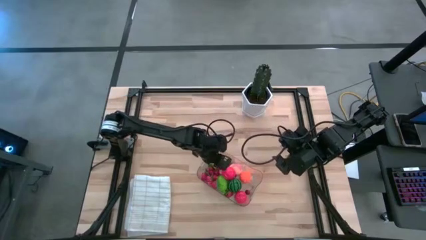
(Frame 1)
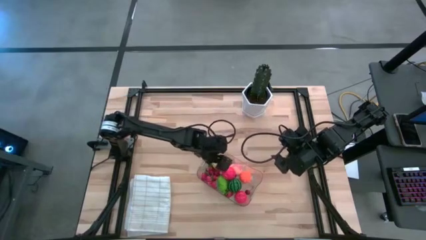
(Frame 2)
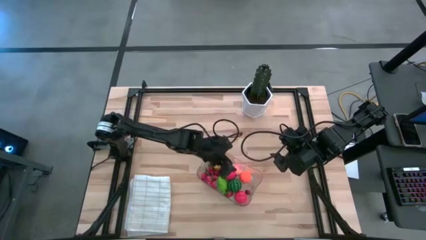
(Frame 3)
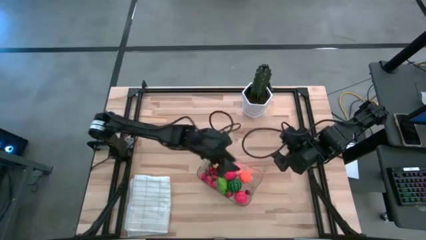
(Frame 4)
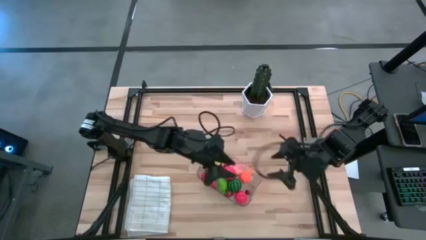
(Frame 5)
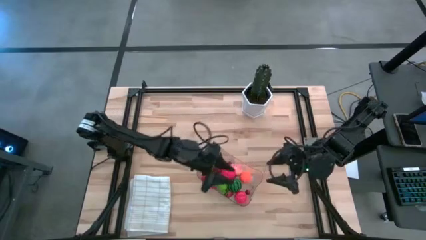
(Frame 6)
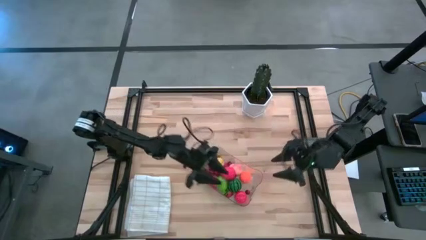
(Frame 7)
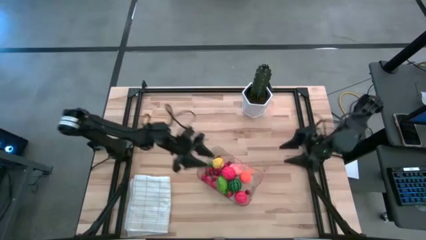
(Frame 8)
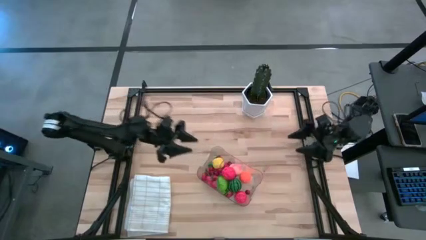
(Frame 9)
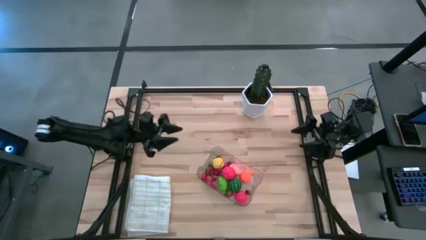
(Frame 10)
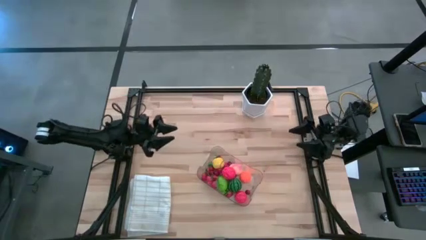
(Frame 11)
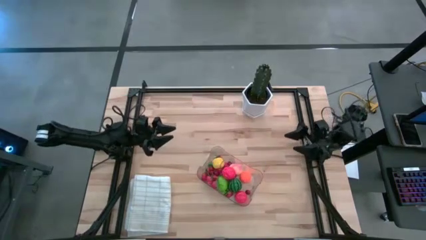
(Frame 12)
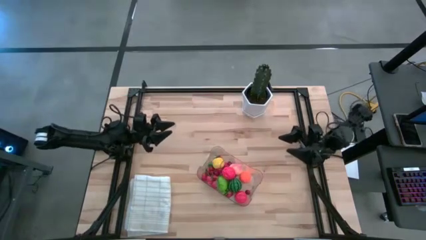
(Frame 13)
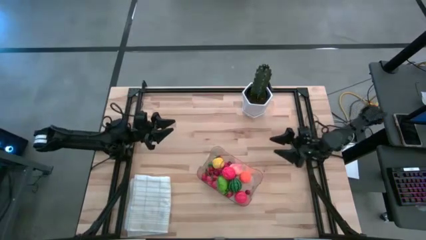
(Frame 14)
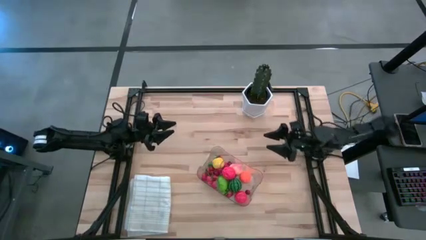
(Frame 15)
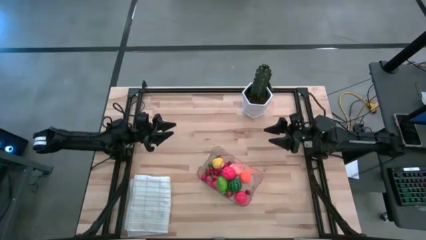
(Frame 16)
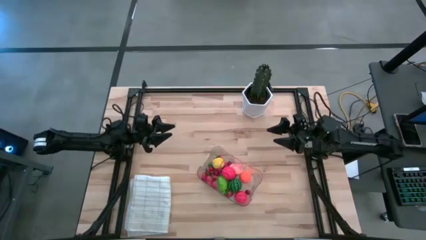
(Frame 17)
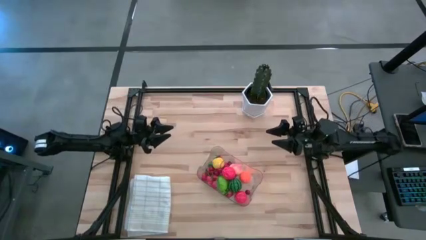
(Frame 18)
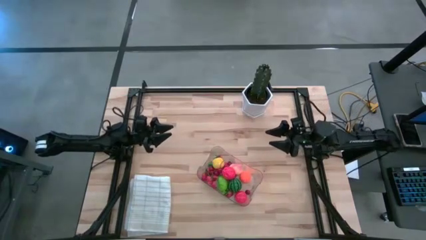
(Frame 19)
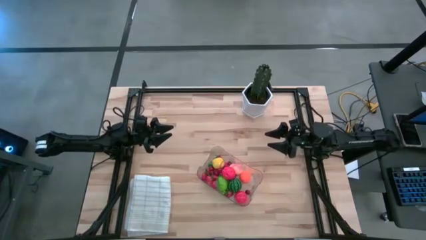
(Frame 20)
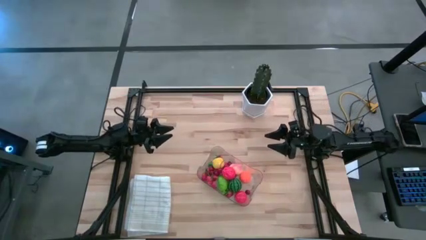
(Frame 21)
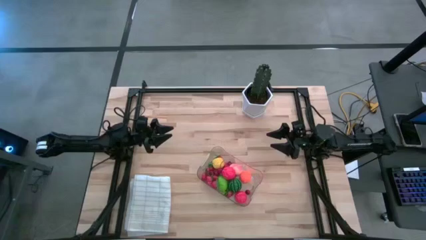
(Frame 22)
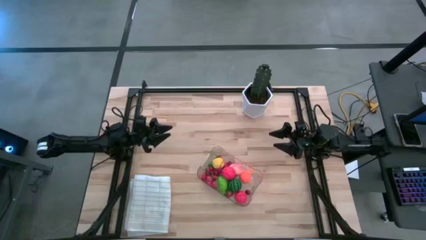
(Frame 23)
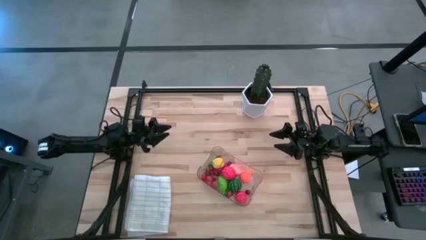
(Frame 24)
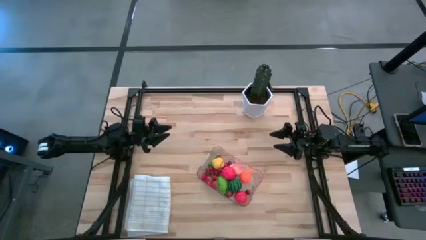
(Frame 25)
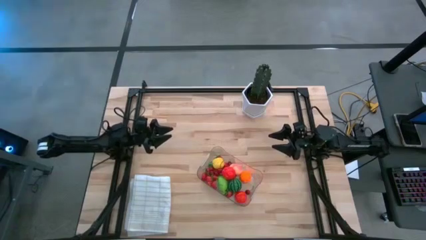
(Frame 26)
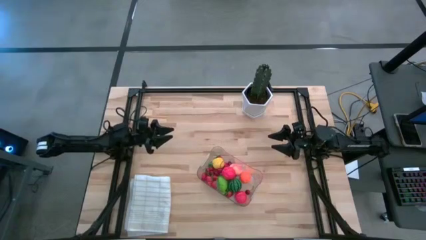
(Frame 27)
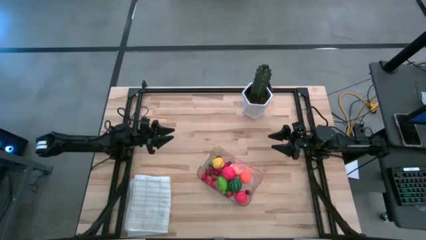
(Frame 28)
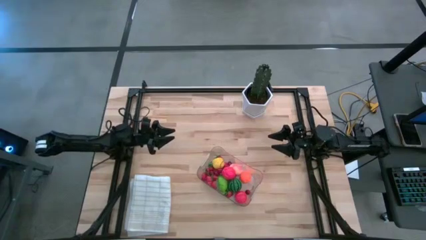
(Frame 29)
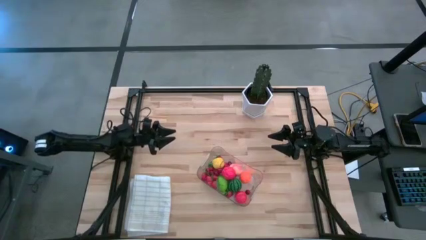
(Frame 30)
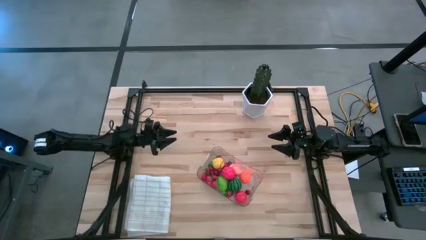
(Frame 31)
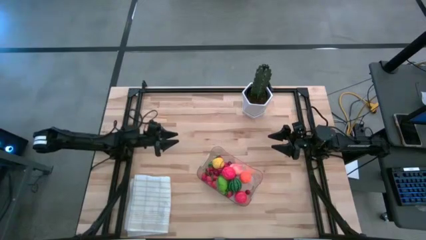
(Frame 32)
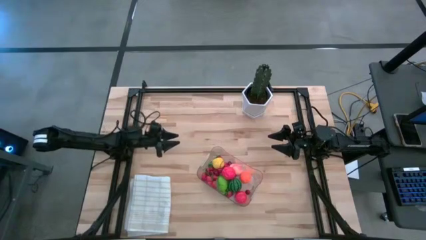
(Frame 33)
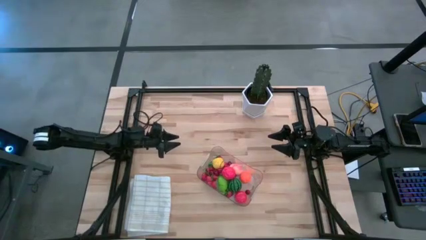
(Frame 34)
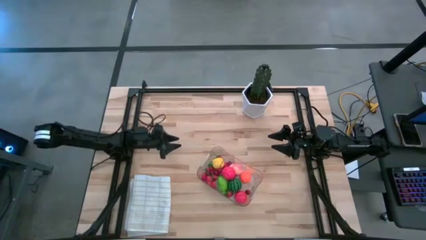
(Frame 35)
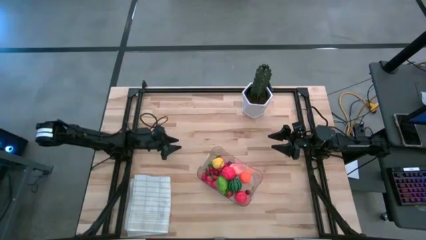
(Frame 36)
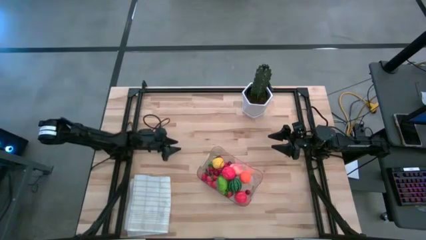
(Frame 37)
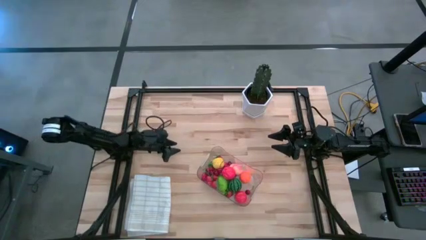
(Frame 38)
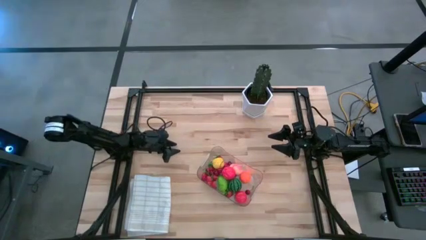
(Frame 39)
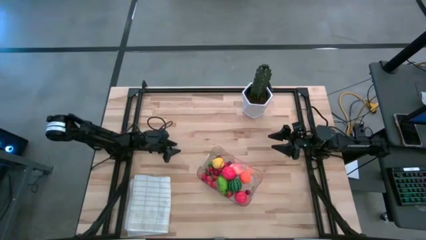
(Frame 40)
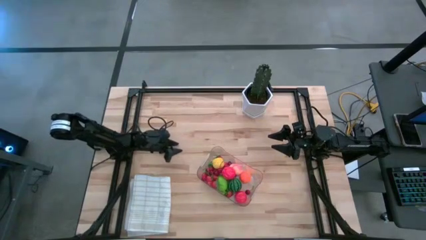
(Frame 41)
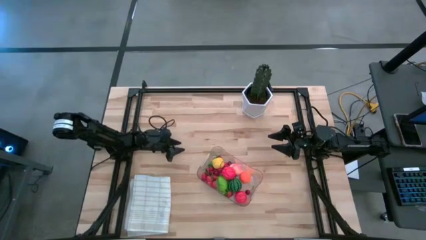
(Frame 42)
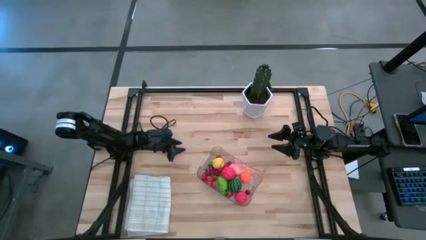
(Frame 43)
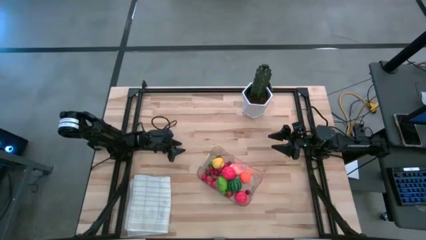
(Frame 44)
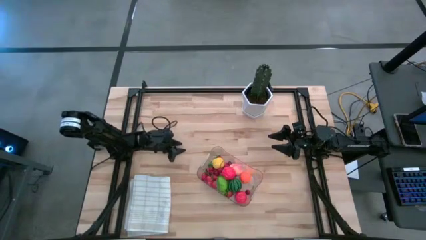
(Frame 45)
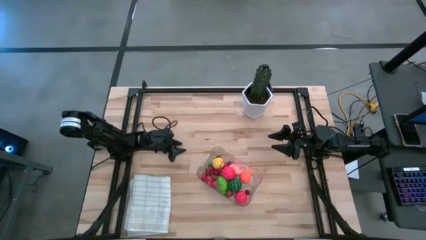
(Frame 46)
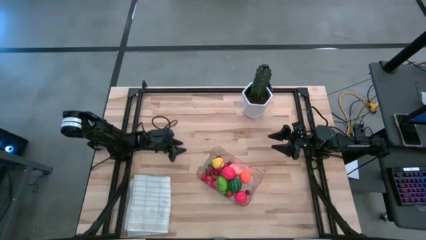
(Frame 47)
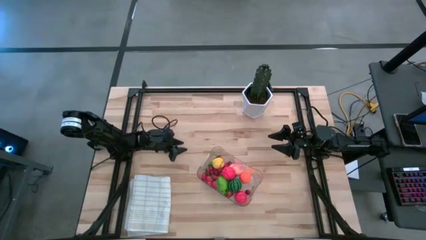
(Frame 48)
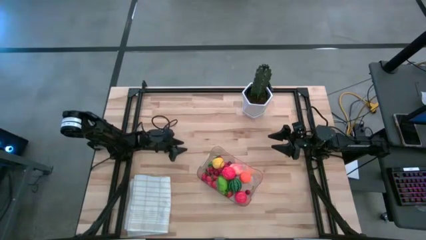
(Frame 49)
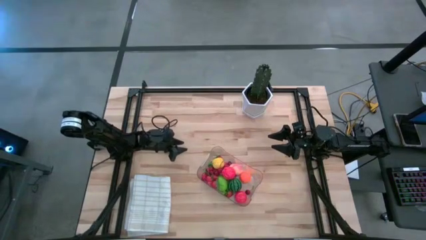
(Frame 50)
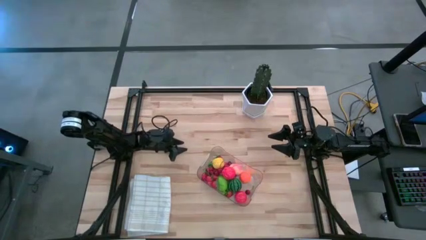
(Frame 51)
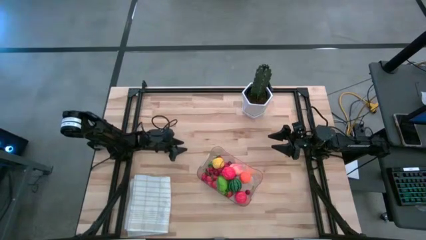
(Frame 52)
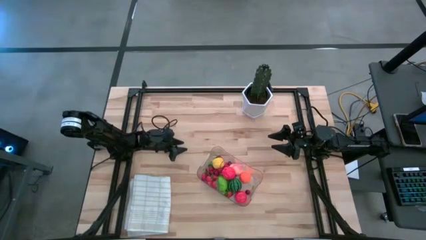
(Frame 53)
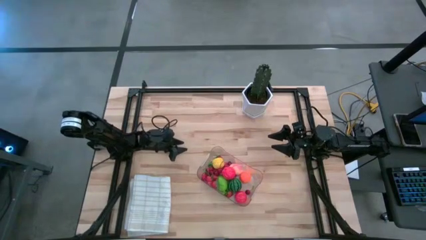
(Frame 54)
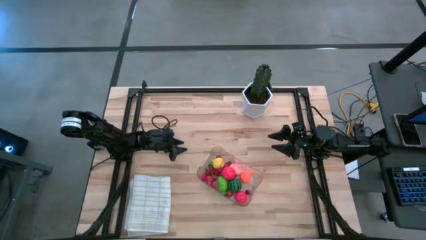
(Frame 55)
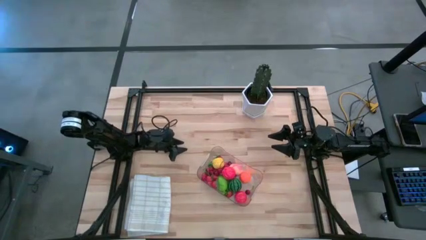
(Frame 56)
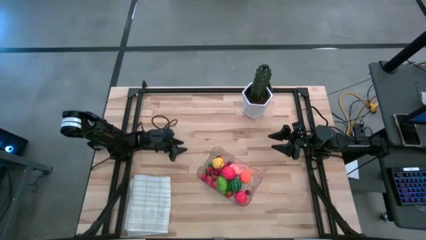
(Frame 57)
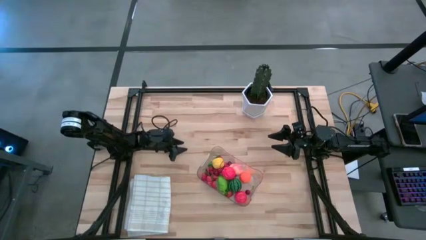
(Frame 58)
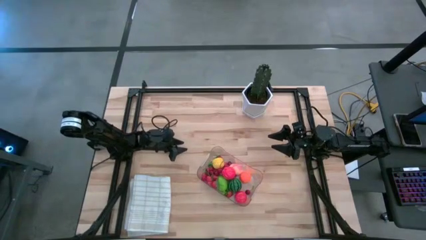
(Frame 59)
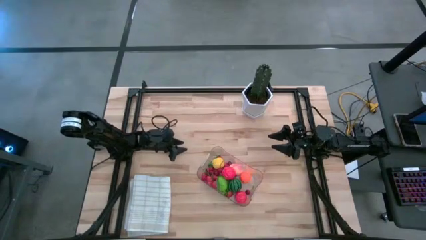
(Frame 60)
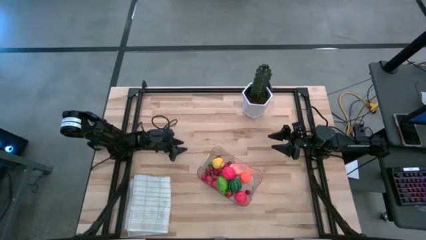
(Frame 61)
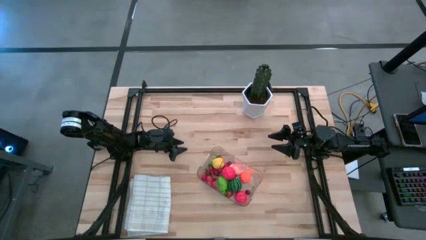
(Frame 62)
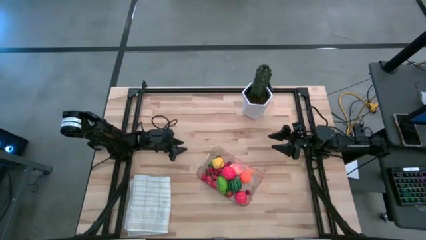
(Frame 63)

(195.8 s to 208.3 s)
Task: Pick and placing Produce into tupperware
Return to Home Position

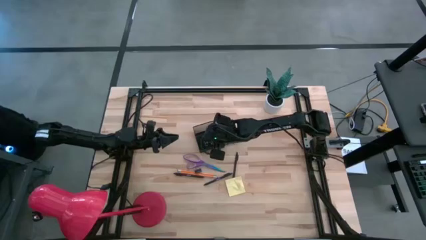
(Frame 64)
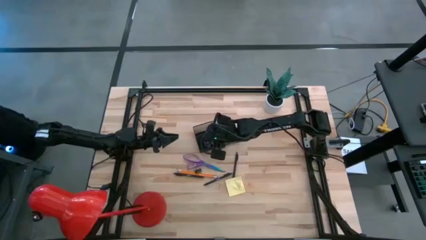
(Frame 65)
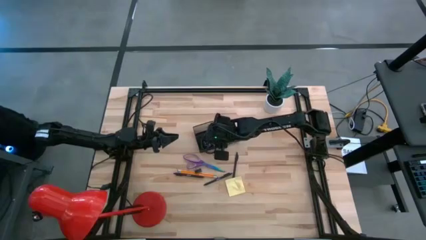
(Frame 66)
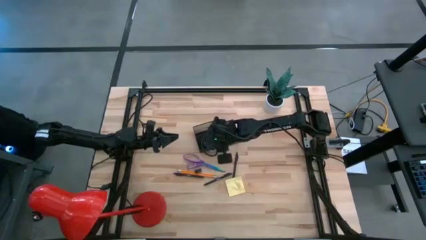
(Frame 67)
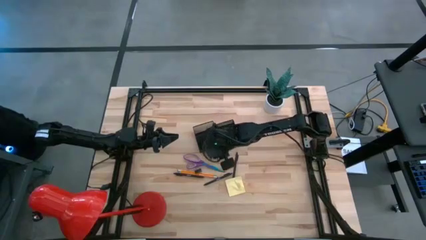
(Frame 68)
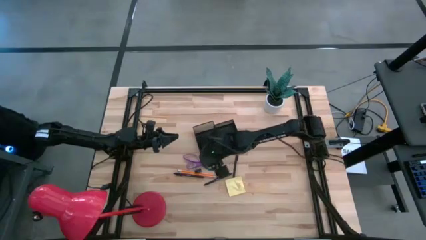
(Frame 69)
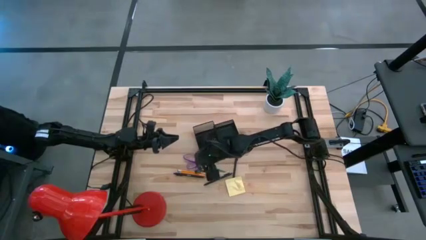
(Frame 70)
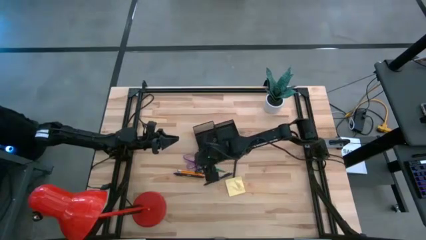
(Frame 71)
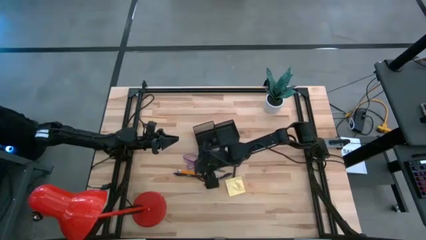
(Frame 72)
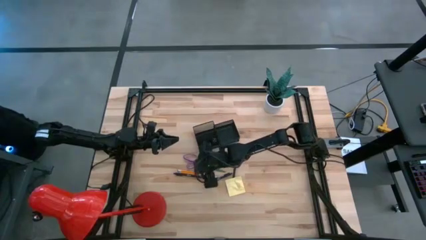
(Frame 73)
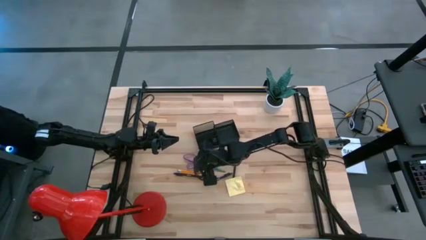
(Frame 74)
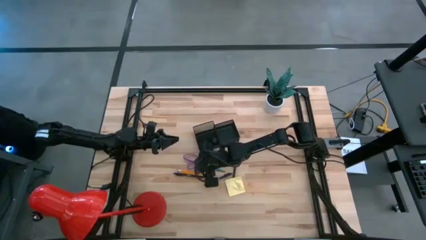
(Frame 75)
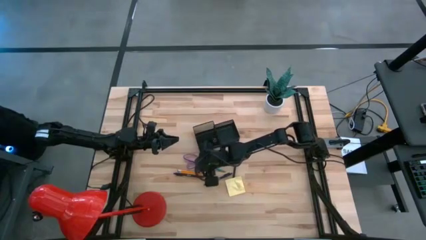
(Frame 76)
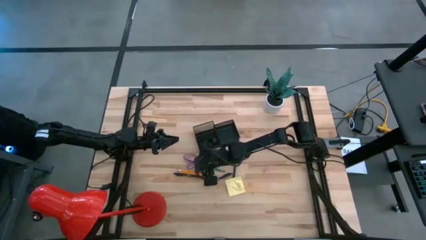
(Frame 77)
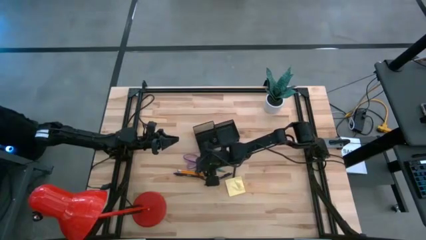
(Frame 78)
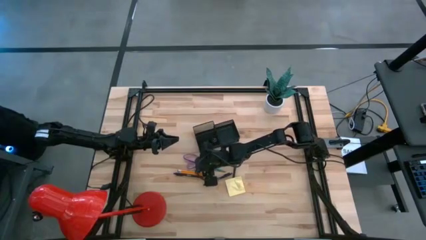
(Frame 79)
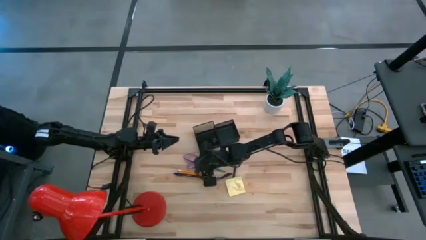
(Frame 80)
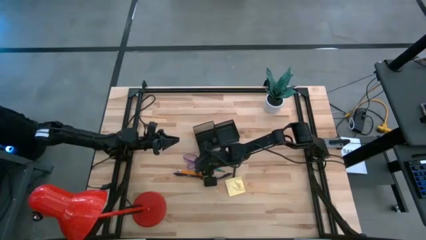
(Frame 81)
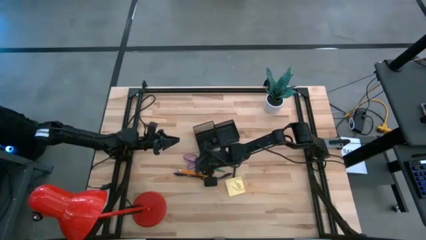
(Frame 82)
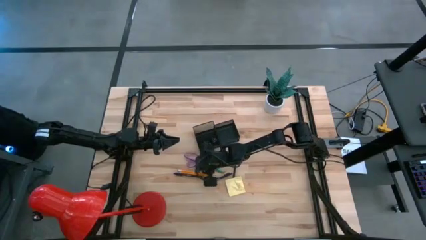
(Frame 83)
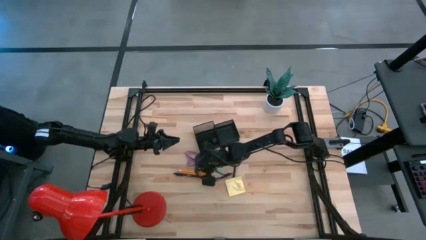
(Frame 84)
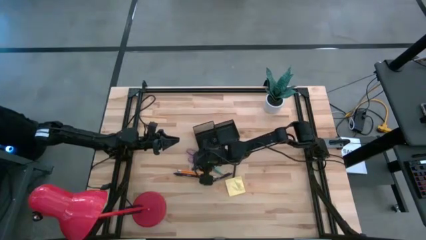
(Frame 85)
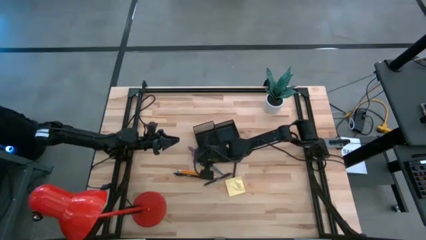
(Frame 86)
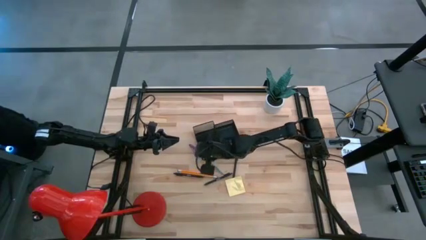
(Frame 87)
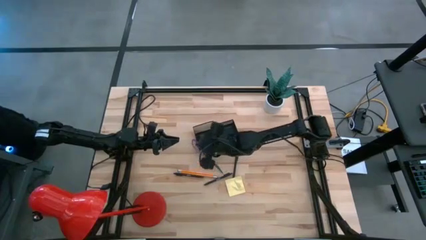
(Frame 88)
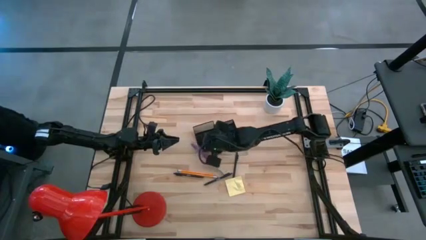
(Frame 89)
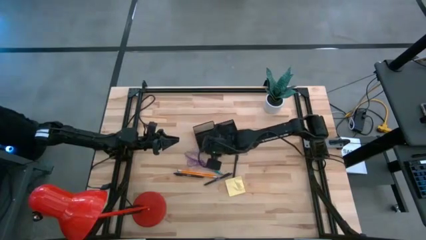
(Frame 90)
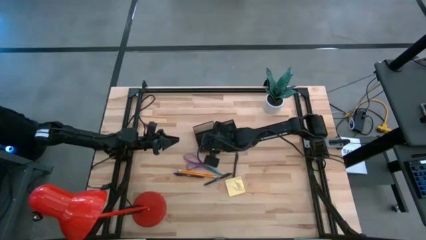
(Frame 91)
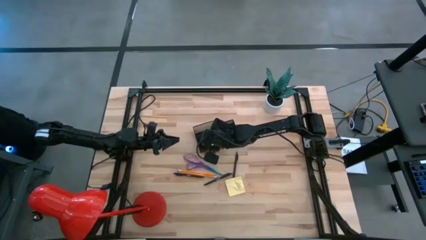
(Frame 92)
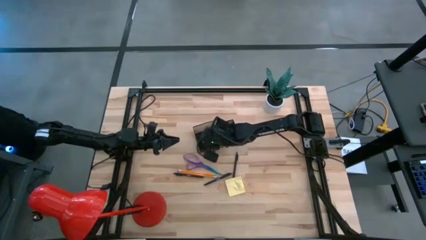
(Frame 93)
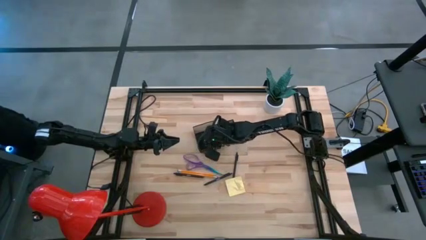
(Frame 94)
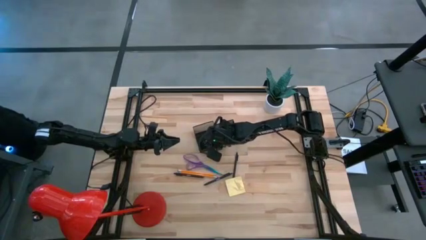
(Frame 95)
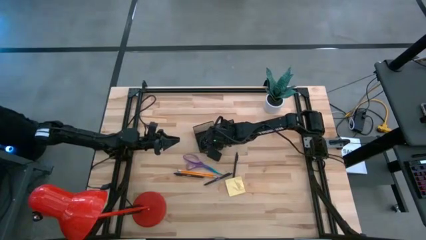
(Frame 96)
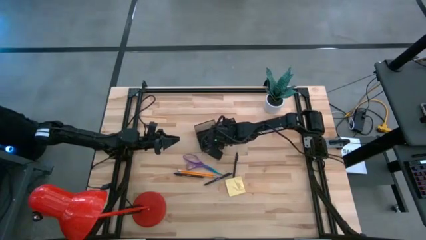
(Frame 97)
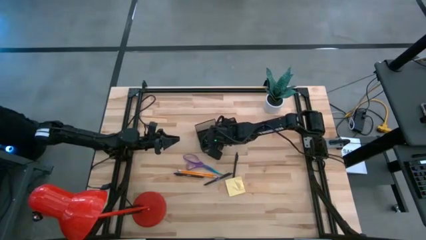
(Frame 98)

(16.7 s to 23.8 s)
Task: Pick and place office supplies into organizer
Put the black binder clip into the black desk organizer
